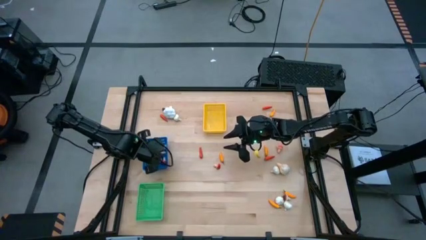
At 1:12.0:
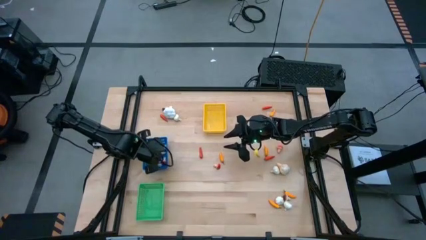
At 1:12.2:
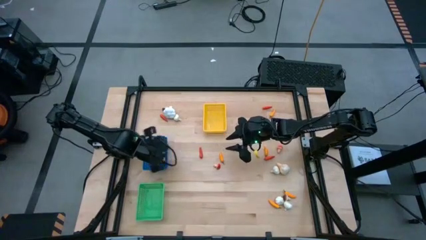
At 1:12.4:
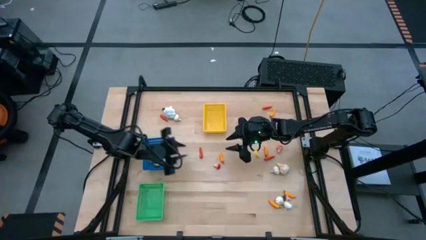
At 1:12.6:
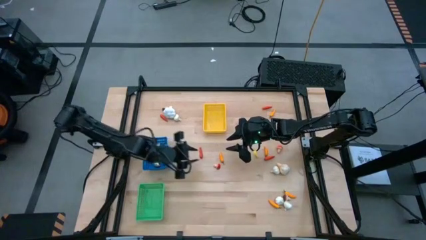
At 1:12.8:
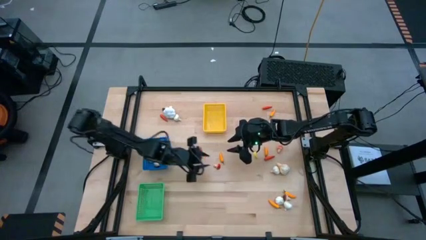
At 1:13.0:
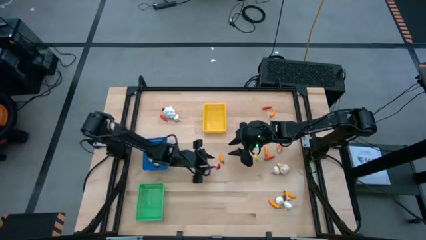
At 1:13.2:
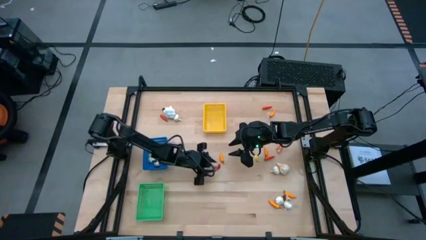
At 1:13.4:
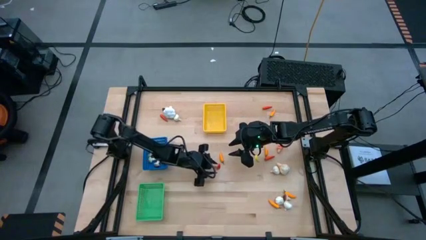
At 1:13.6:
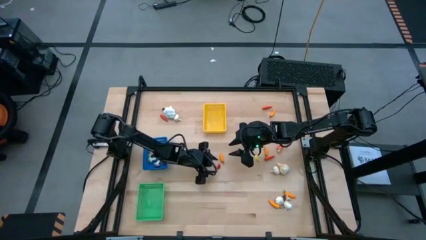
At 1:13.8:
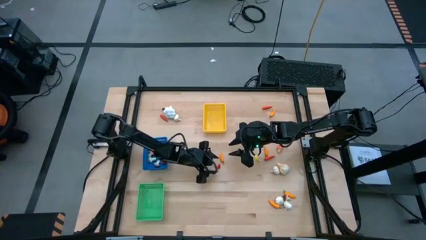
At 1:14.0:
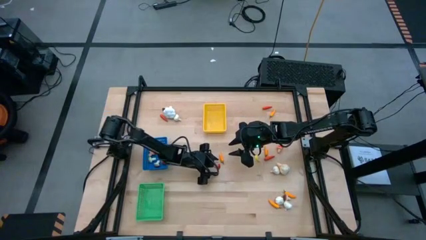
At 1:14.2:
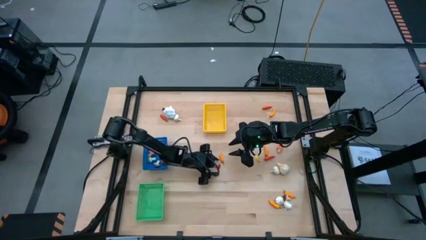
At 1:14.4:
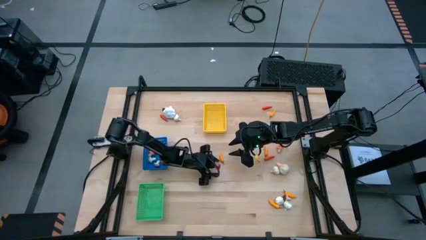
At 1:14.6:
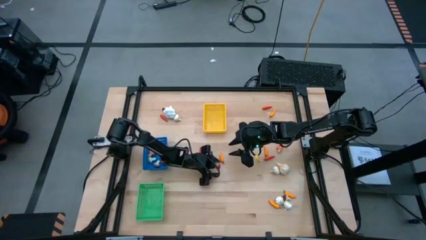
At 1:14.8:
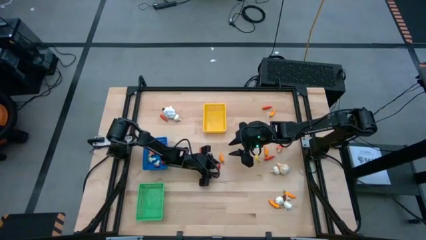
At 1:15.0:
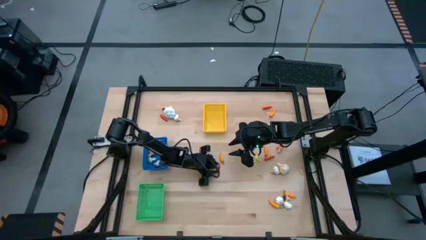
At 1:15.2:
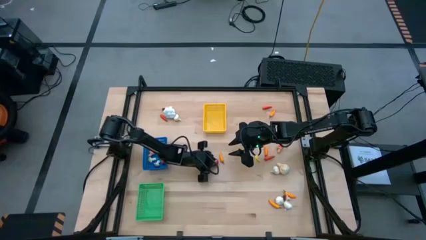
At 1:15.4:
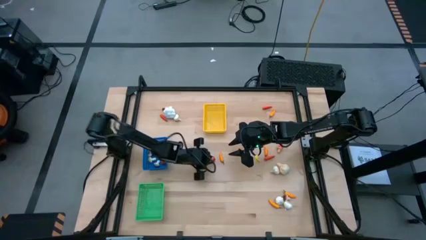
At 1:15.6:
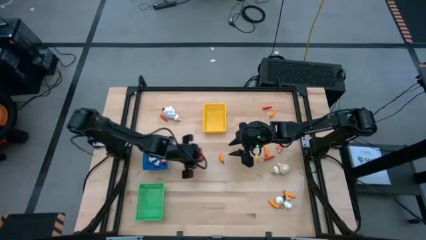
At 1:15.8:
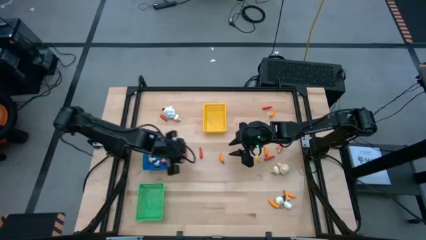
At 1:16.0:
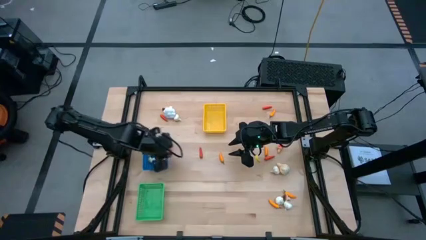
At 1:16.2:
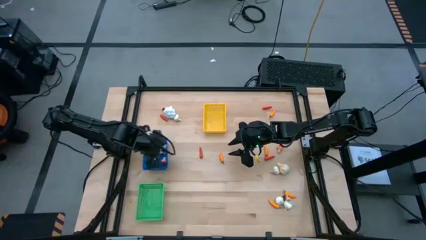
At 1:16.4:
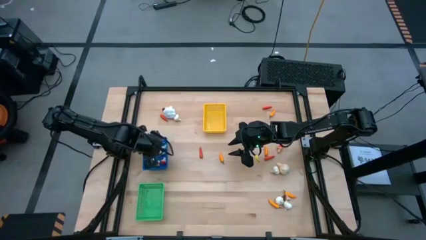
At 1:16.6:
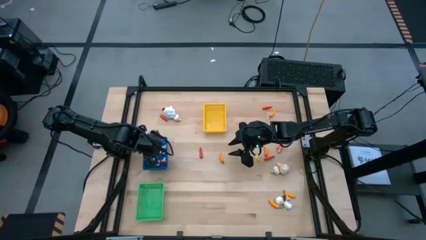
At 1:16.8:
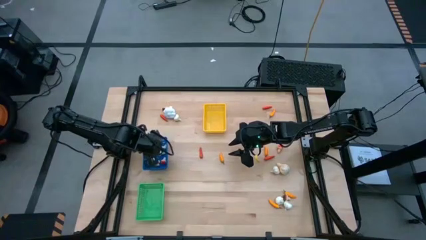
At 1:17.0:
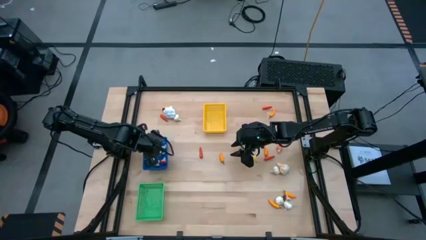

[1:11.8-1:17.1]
Task: Sort produce into baskets
Put the orange mushroom into the blue bin

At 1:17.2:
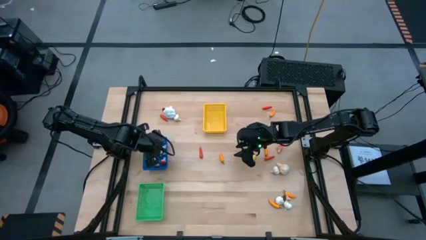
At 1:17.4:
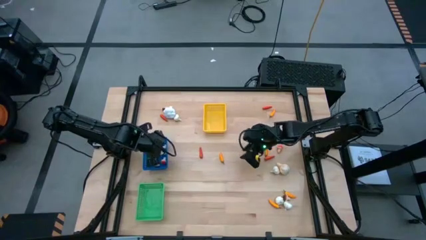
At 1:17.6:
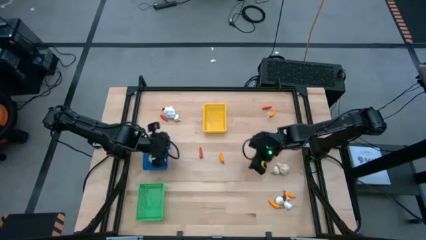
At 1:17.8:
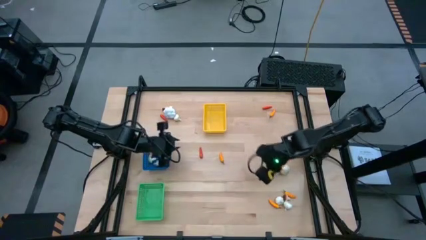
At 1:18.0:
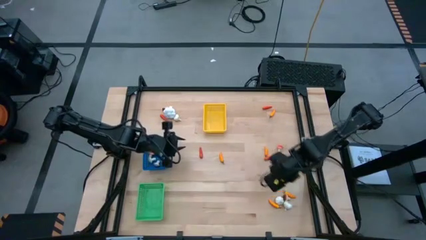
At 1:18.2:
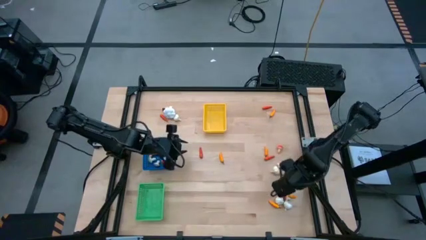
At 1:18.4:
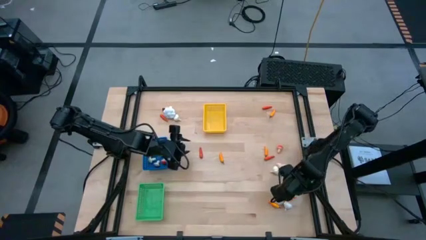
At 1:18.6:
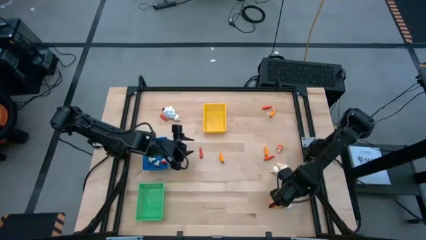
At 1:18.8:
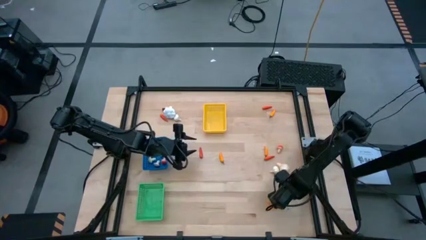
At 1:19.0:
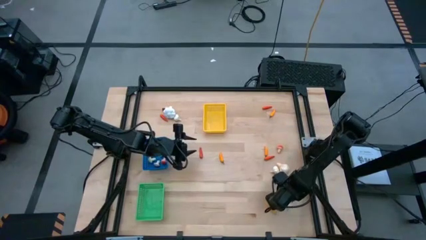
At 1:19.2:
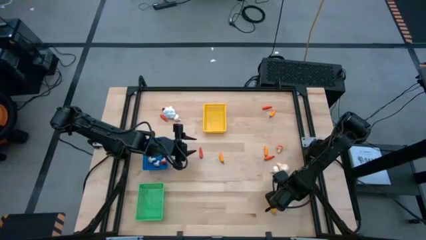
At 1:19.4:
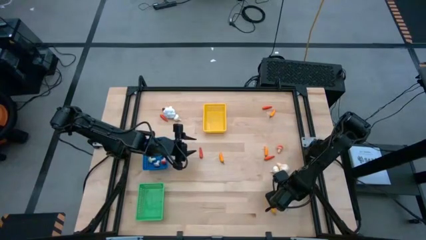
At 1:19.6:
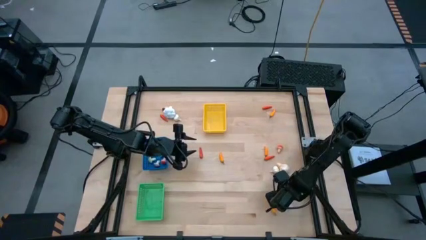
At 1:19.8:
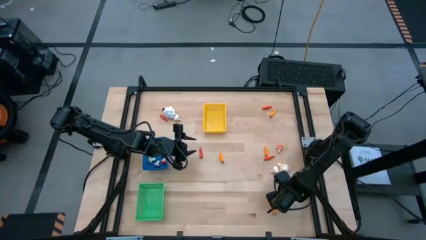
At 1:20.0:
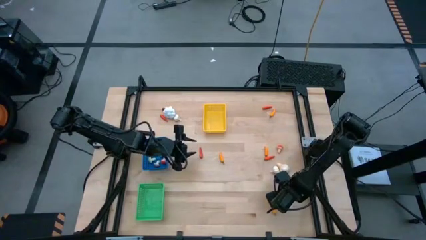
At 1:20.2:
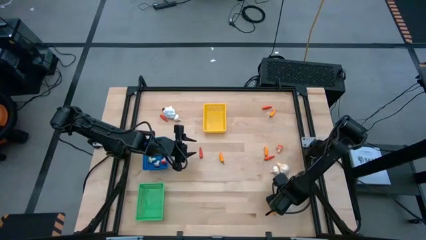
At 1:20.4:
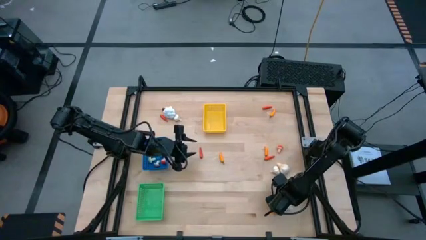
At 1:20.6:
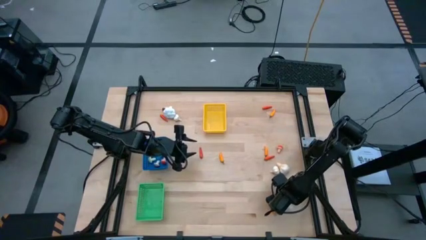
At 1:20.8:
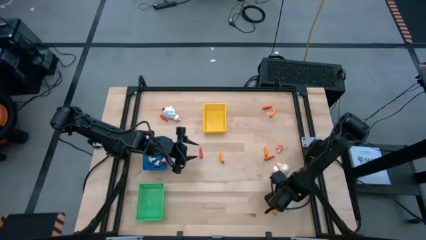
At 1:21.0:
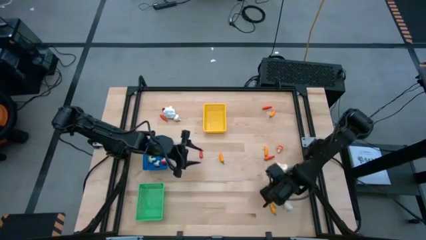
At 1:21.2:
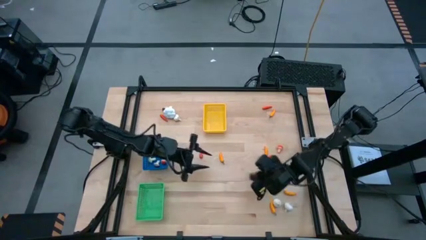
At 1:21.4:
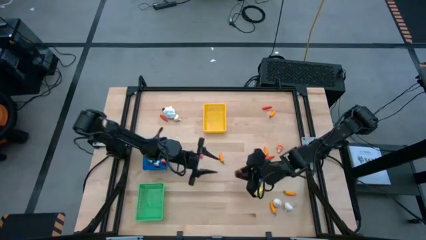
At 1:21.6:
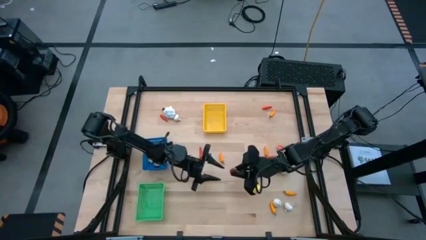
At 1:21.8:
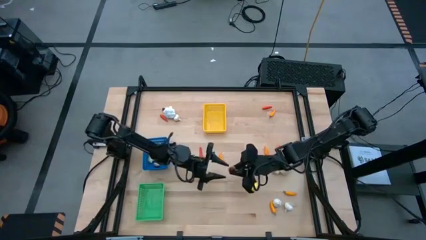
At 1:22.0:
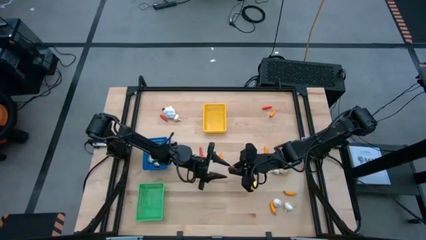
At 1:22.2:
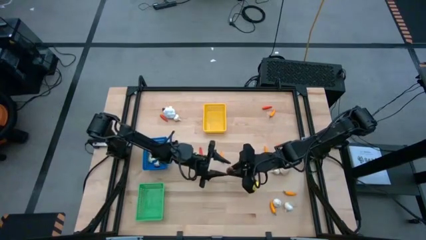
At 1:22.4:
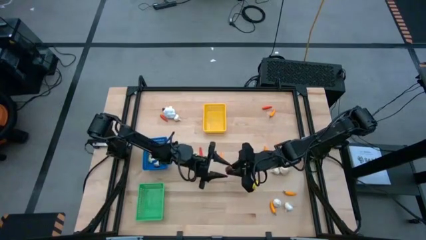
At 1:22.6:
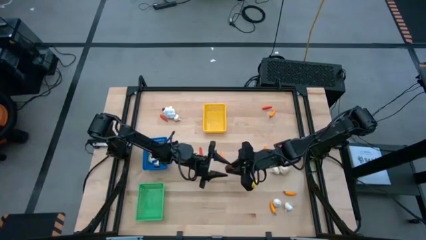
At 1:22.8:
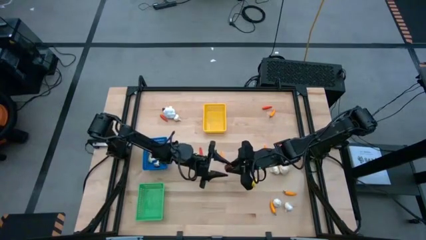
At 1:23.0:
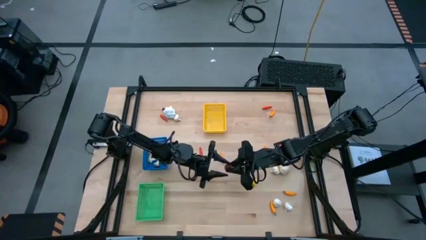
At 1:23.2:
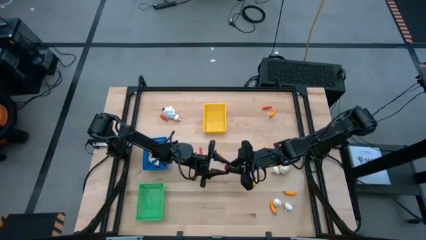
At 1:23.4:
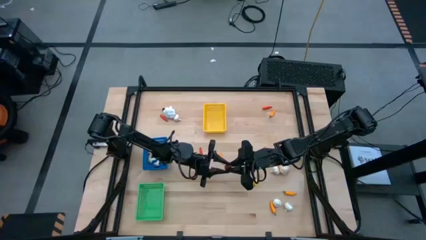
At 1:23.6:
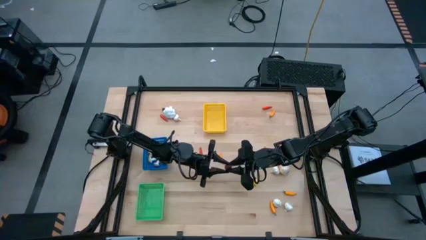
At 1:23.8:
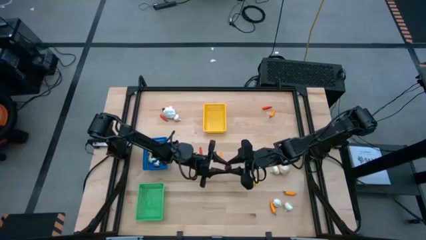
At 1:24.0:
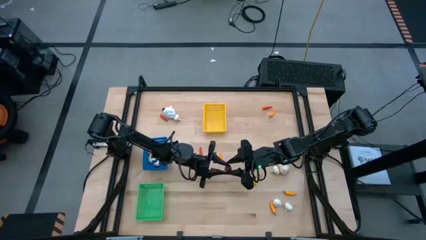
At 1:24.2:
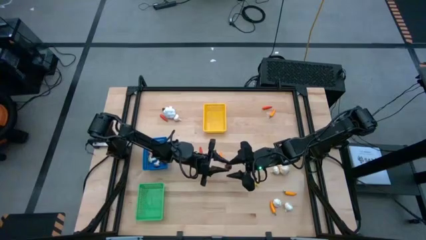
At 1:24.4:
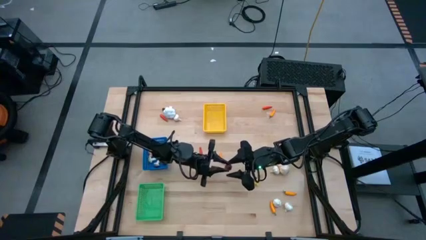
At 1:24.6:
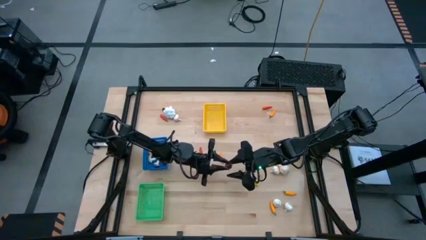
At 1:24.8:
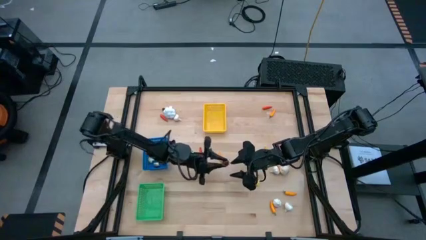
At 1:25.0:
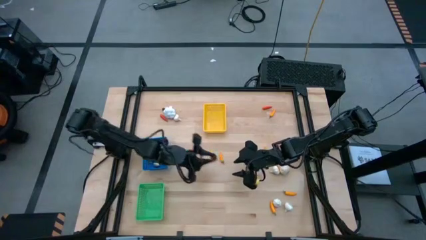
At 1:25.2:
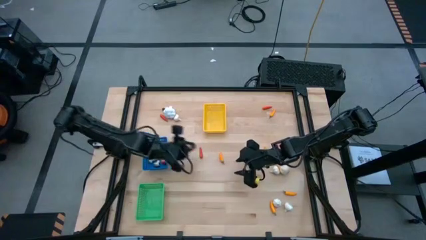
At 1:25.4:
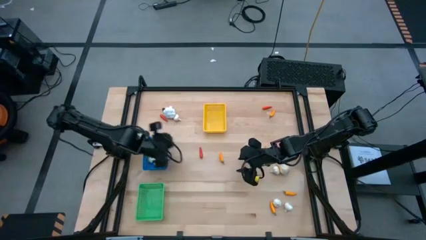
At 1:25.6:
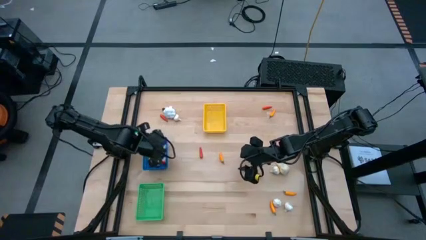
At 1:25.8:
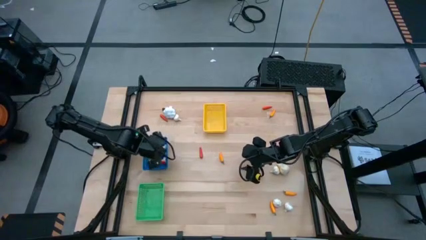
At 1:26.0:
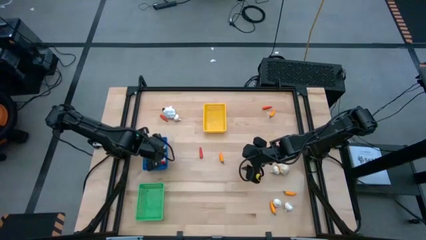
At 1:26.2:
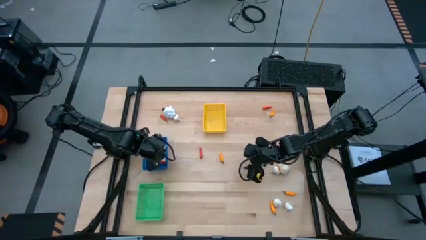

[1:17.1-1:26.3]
Put the brown mushroom into the blue bin

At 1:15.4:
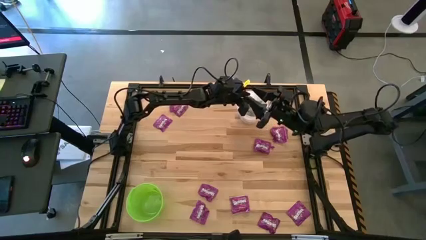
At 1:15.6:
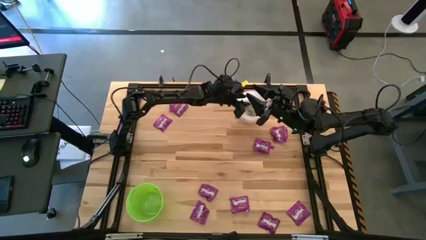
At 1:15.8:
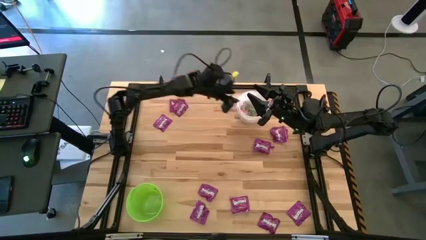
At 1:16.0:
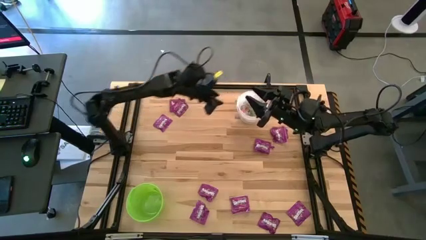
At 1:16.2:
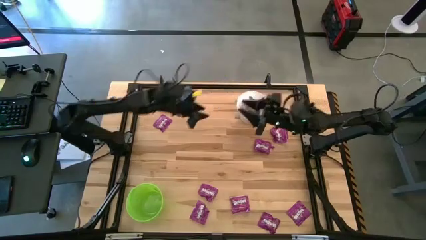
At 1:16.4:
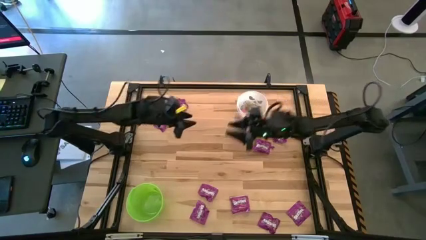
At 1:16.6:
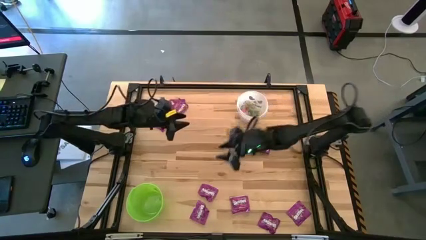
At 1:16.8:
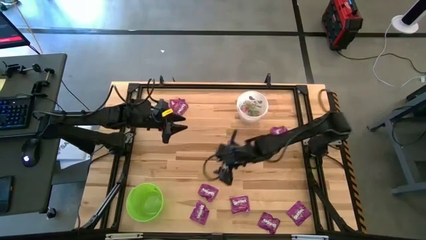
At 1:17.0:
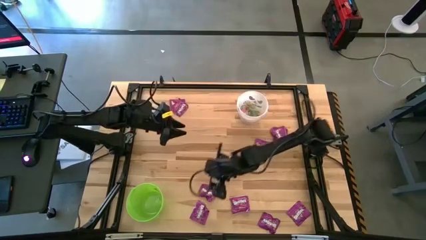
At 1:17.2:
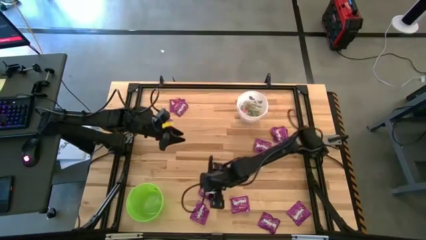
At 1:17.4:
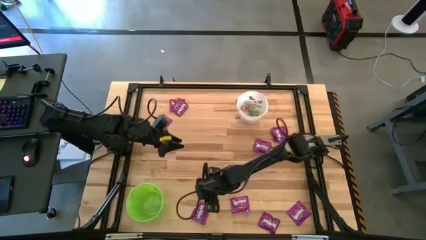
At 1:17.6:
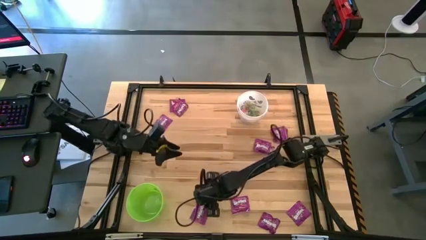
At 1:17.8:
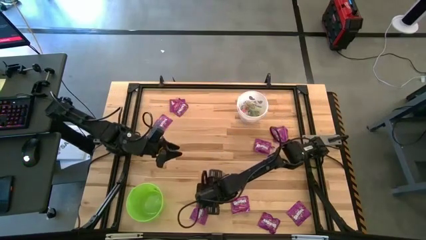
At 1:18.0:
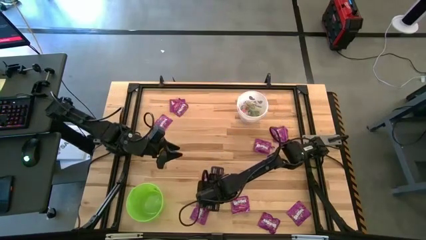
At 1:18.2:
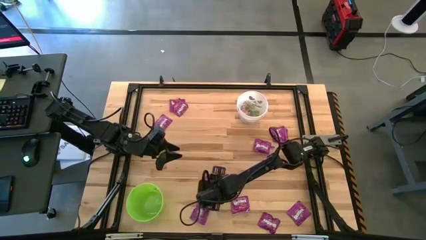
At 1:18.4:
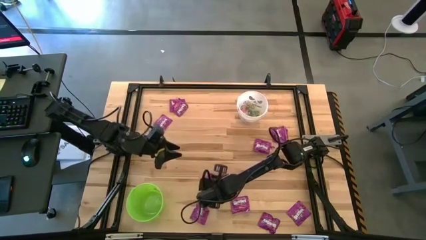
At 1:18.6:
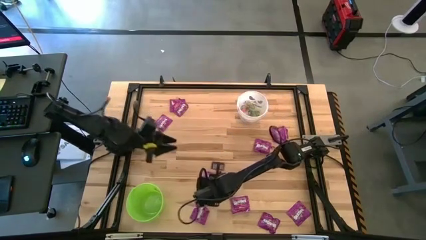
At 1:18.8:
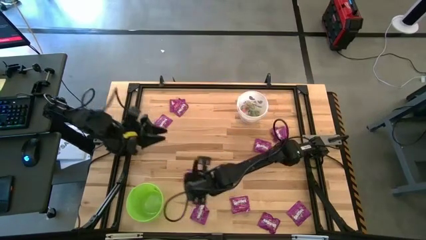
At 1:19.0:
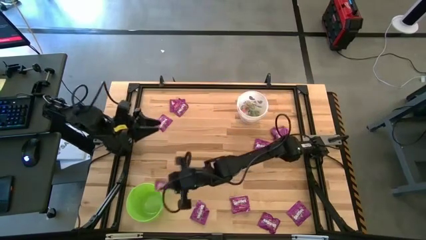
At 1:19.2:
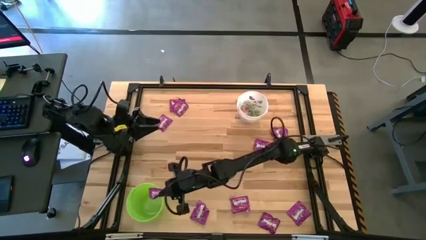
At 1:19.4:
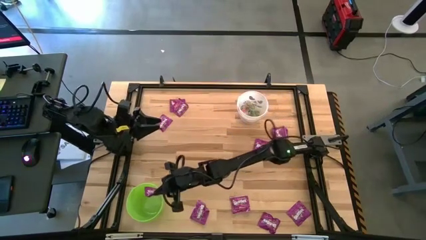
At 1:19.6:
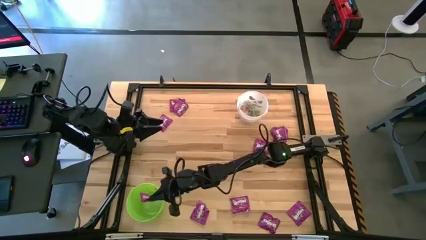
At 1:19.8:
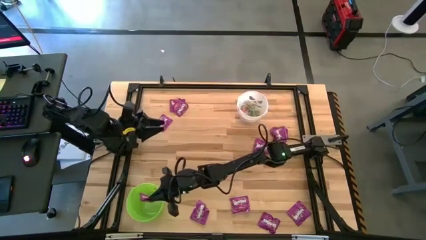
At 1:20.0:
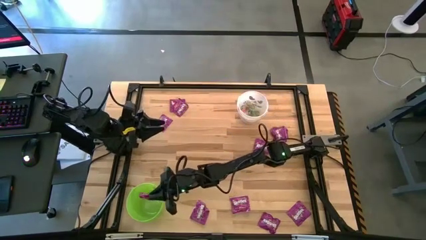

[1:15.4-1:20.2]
Task: Sort candy by brand, put in halloween buckets
Put the purple candy into the green bucket
